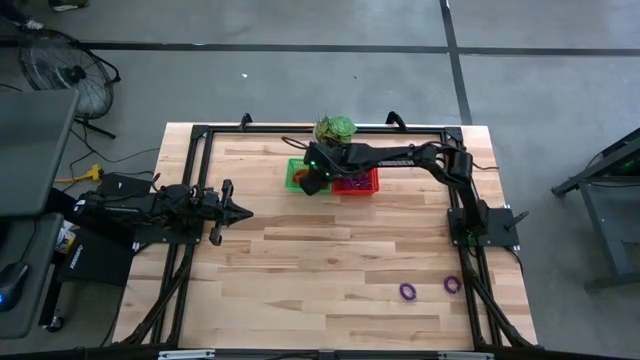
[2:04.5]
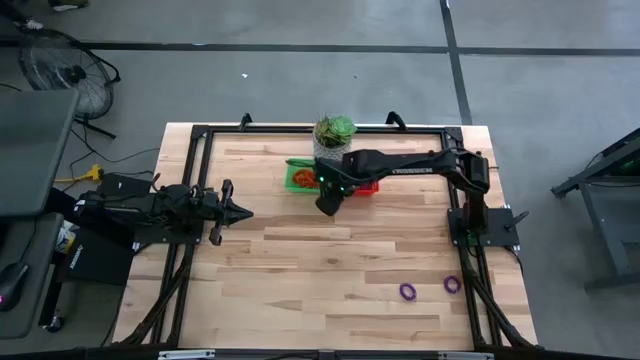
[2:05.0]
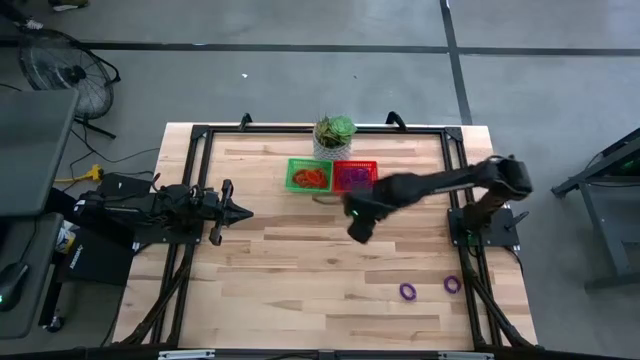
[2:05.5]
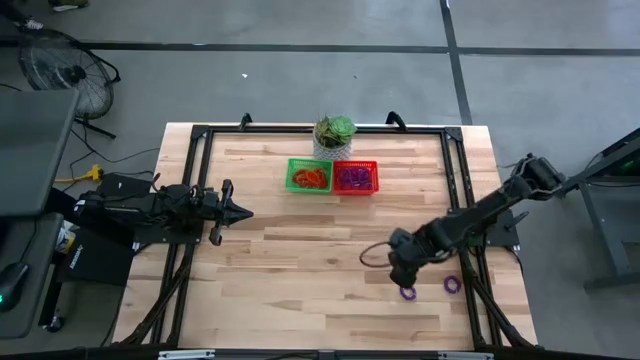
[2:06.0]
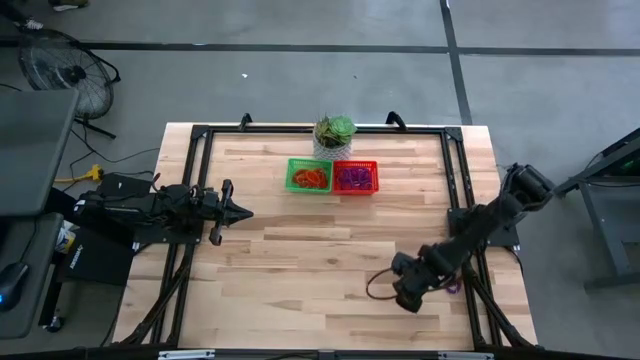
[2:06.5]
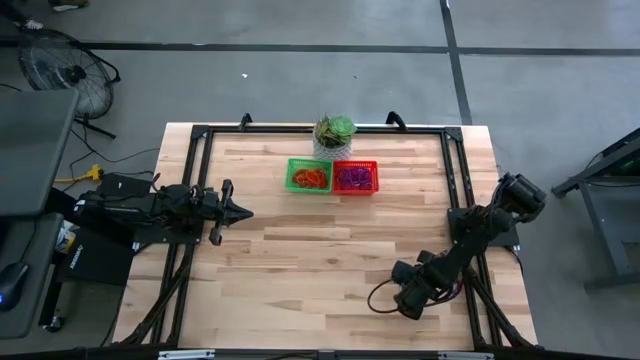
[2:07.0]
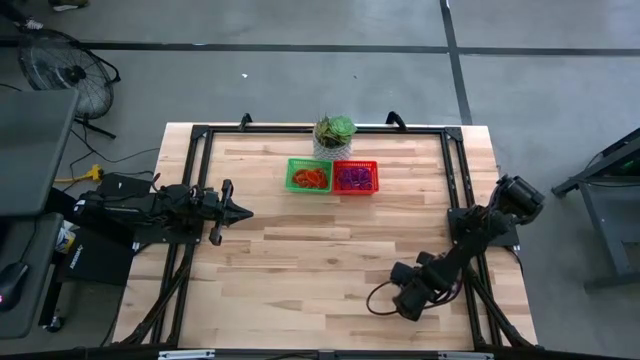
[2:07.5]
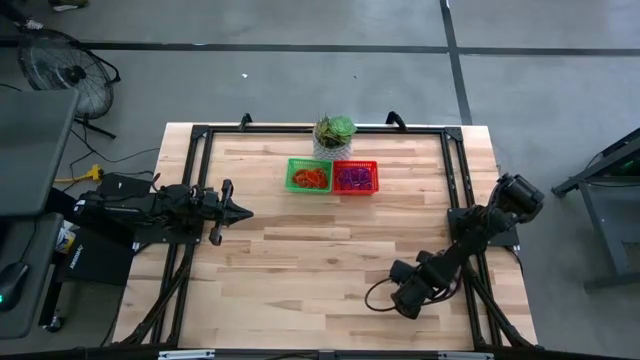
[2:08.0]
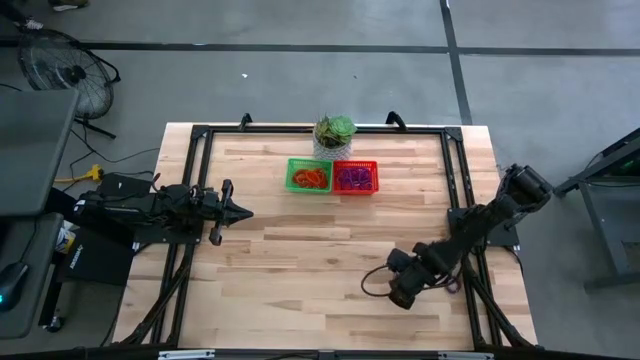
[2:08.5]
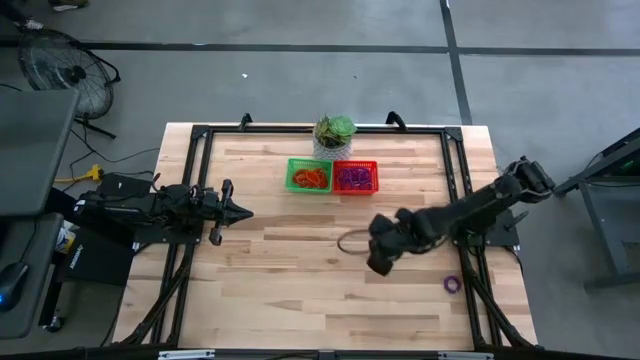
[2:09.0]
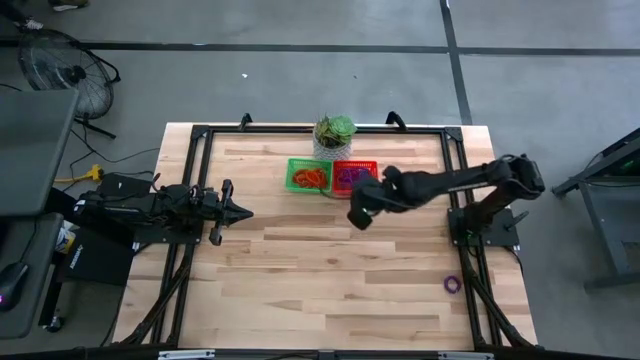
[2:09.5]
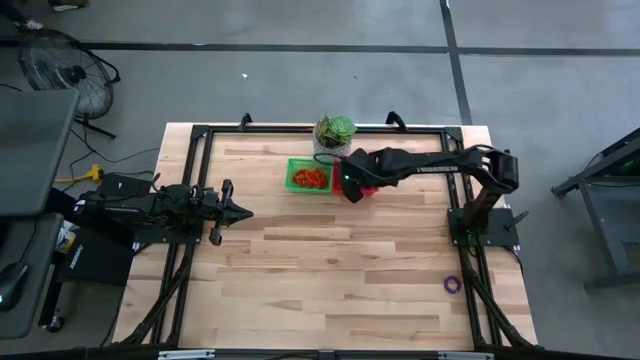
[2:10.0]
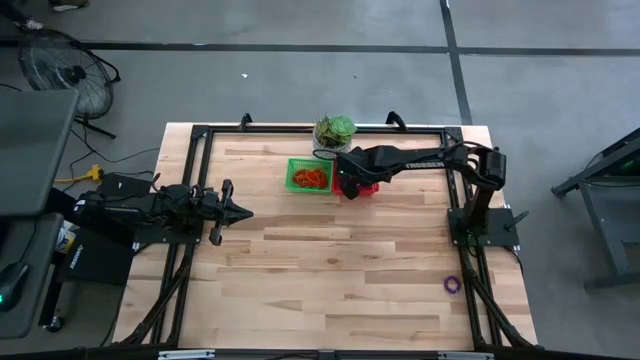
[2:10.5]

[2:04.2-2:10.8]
Task: Sort spring keychains
Put the purple spring keychain into the orange bin

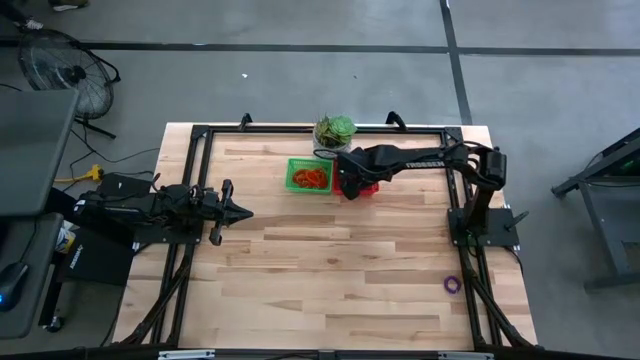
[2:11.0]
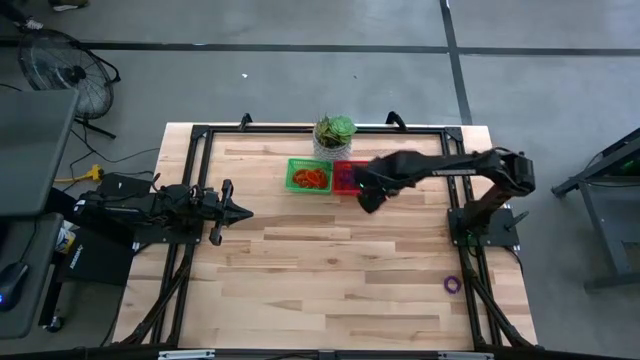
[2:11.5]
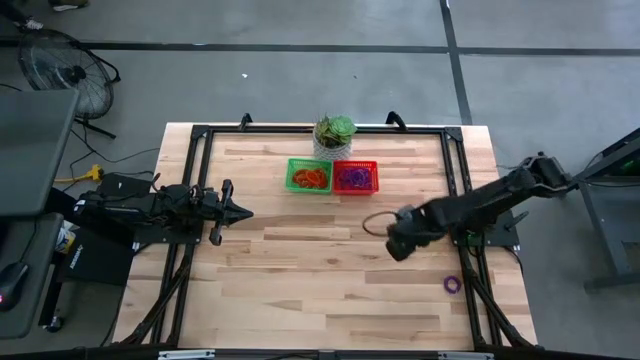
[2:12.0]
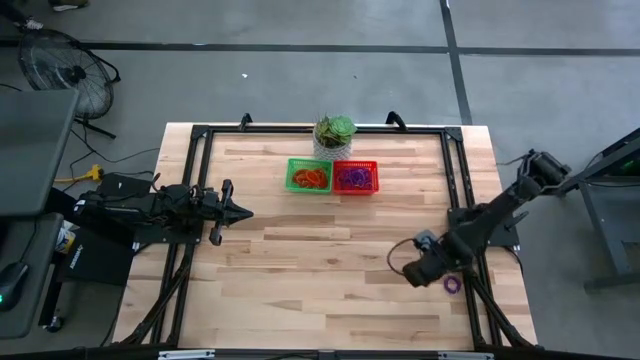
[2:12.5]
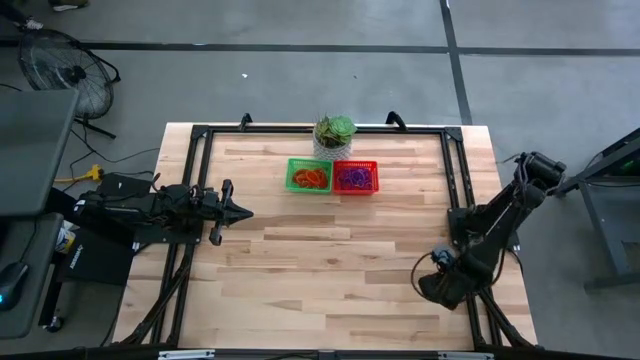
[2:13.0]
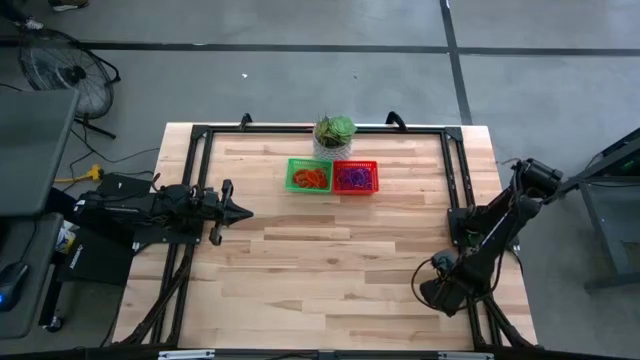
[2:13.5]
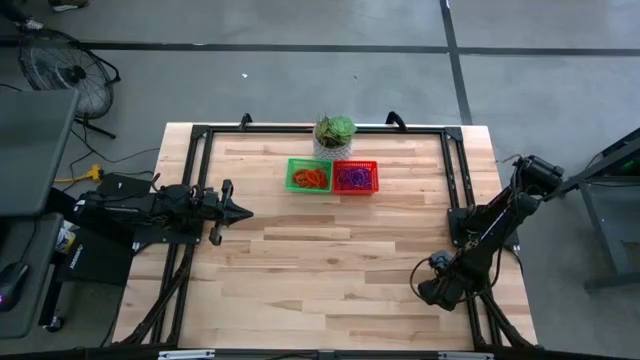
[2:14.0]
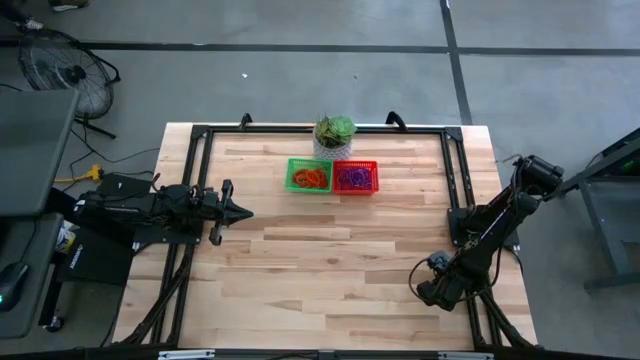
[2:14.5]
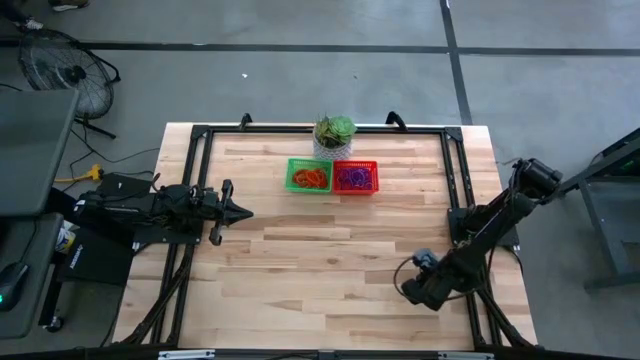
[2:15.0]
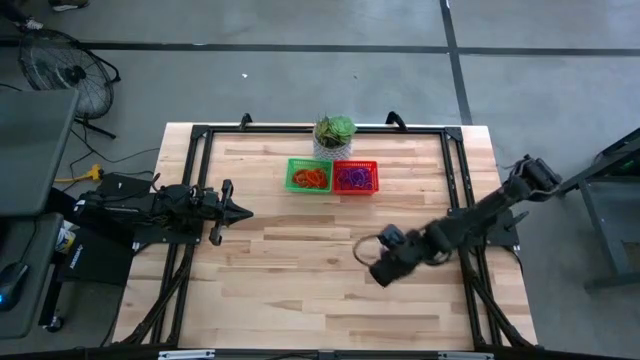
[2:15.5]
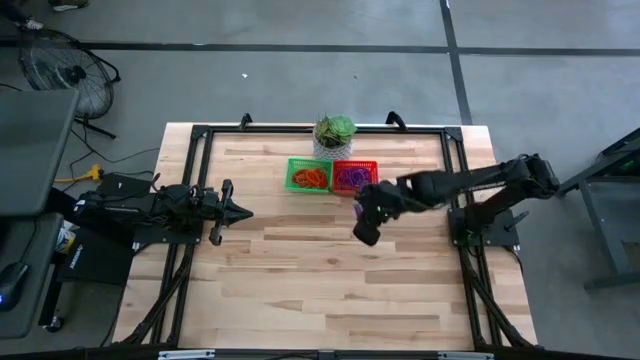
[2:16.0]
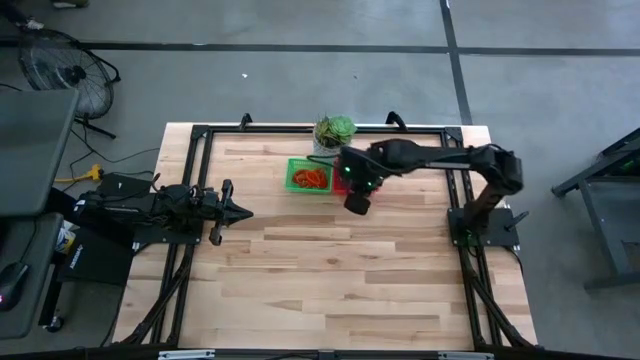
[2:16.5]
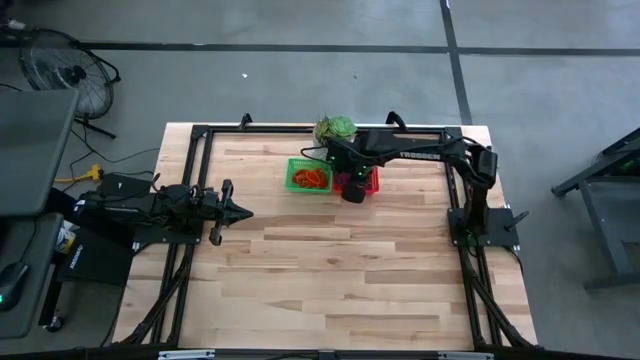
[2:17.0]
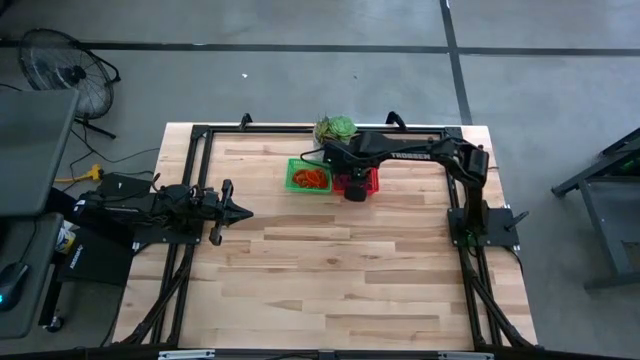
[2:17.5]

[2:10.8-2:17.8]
Put the purple spring keychain into the orange bin

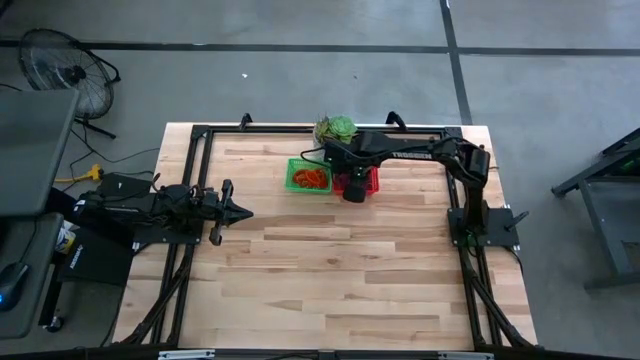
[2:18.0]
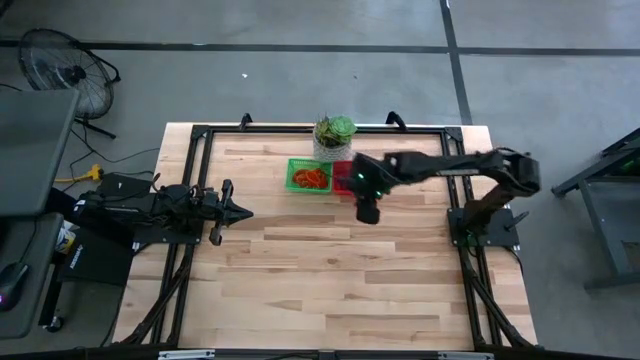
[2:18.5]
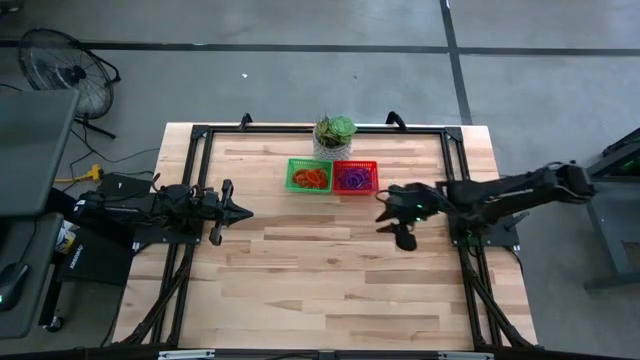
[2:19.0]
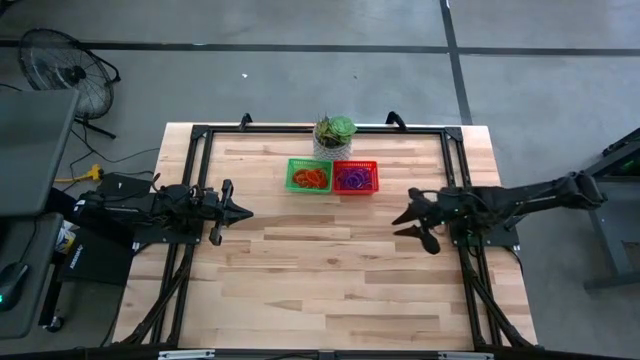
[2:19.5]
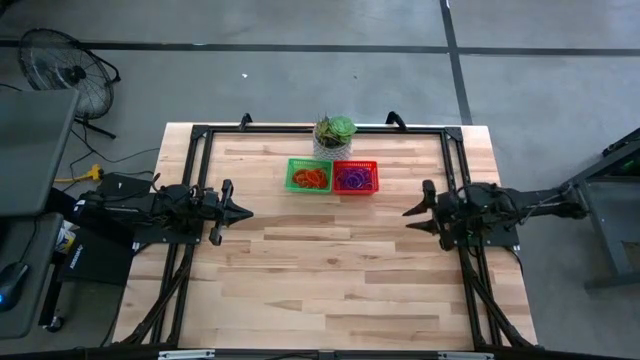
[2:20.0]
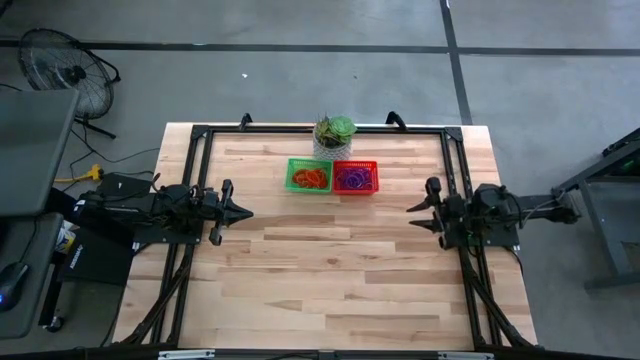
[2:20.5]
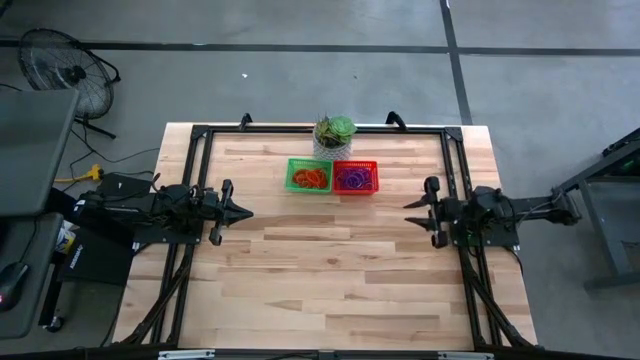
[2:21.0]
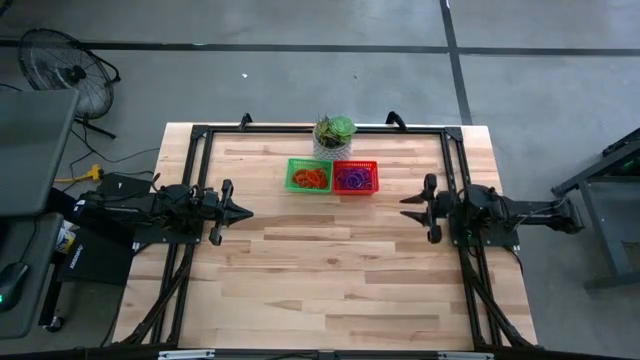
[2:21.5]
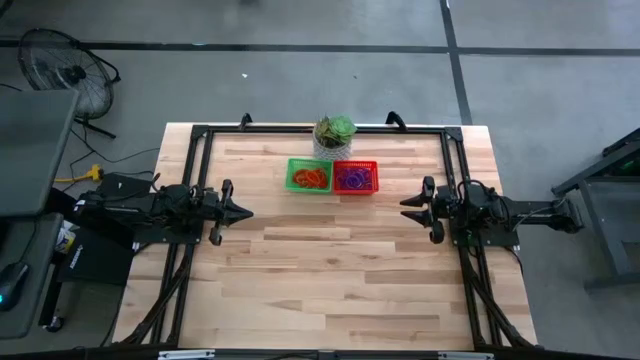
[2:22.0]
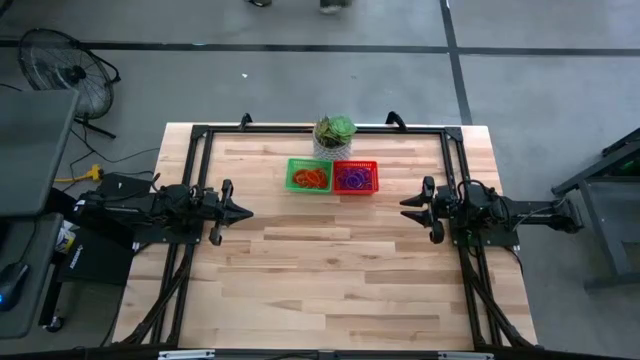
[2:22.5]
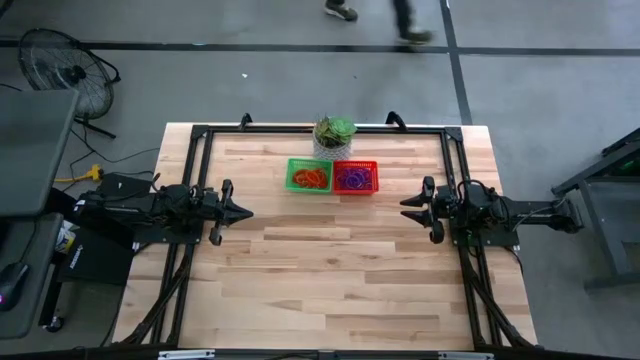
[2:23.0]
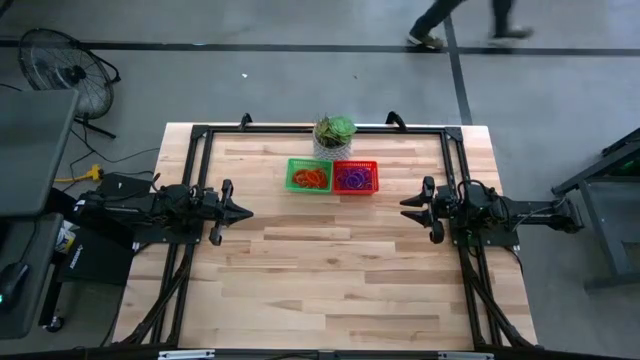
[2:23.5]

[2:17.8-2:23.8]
Return to Home Position

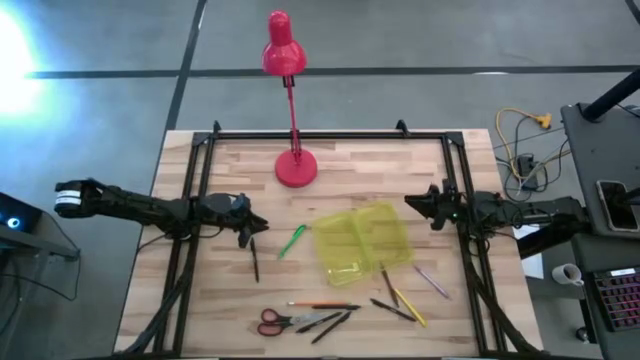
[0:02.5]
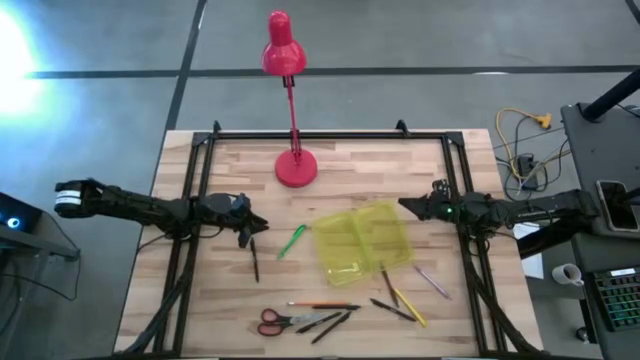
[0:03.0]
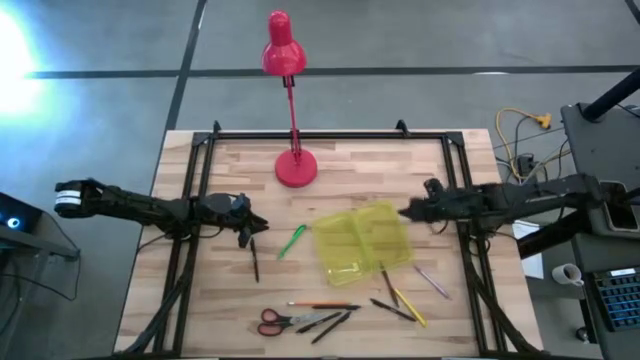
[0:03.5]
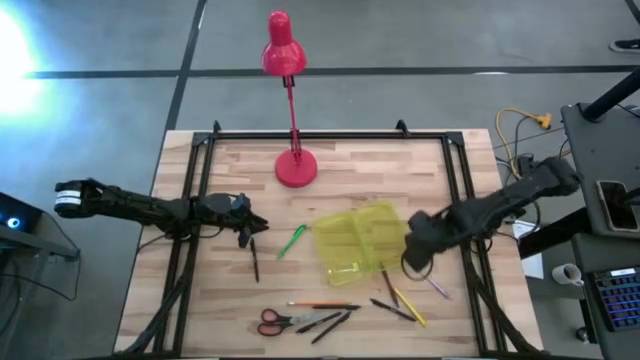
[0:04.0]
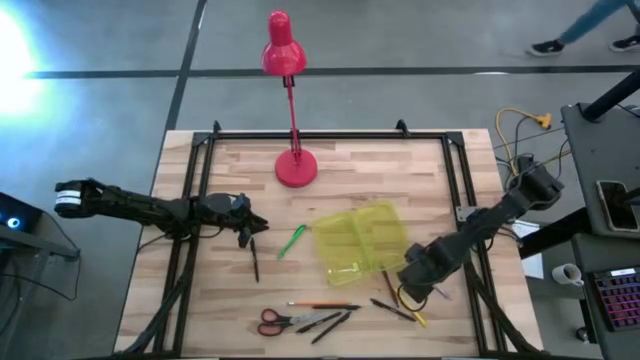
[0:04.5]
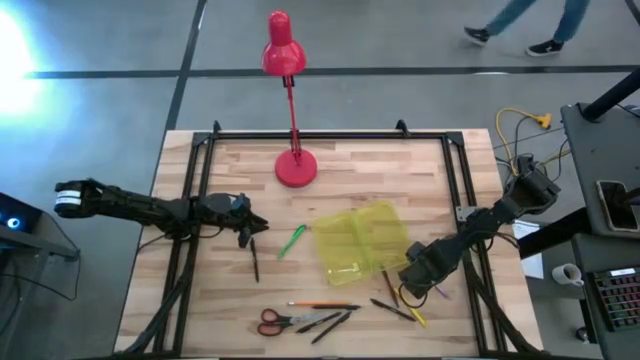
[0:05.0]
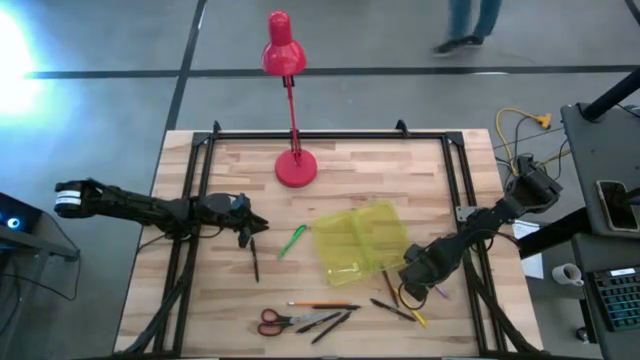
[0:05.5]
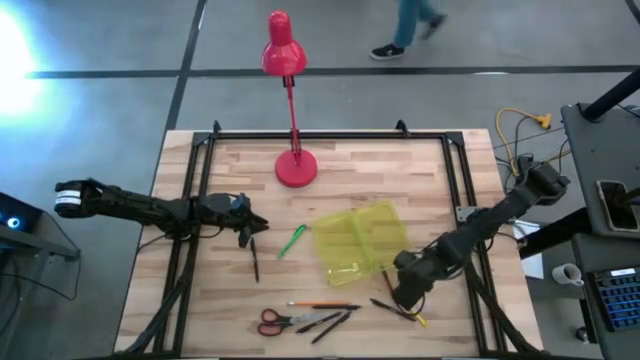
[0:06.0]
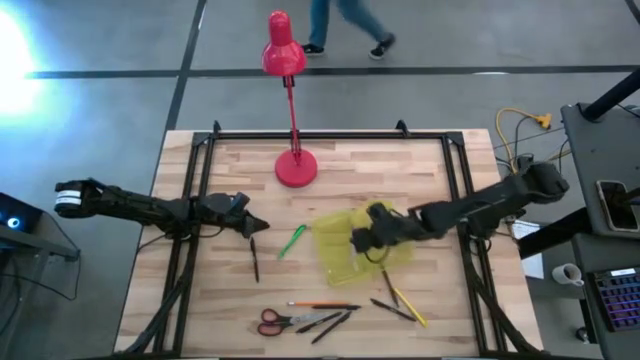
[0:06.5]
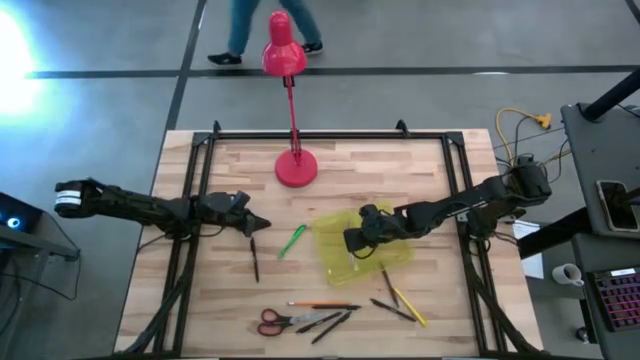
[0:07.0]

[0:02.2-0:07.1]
Task: Pick & place school supplies into a supply box
Put the violet pen into the yellow supply box
